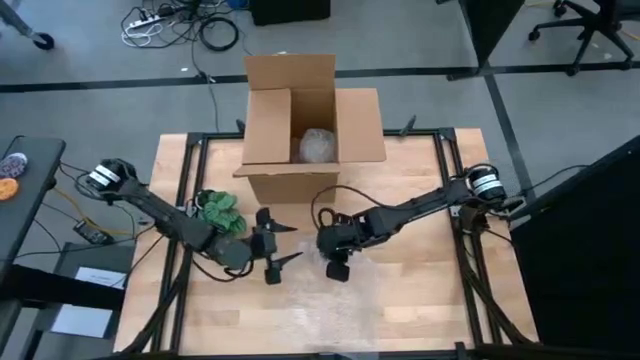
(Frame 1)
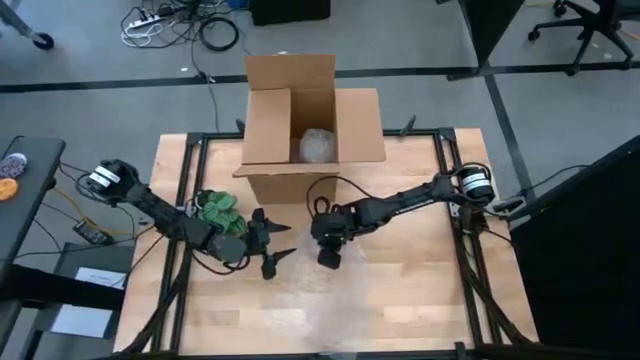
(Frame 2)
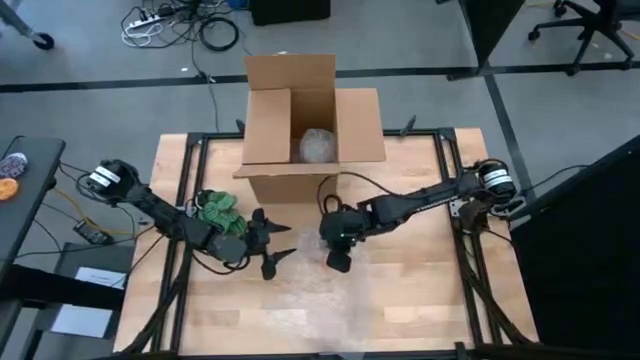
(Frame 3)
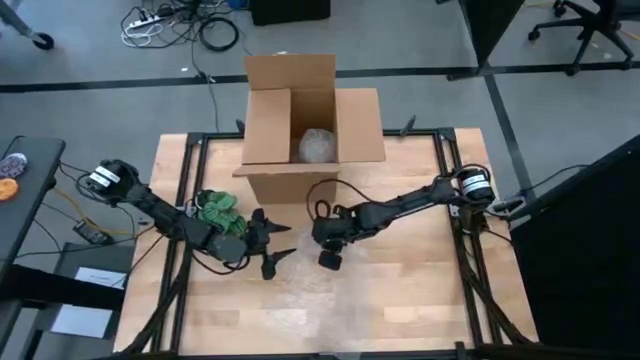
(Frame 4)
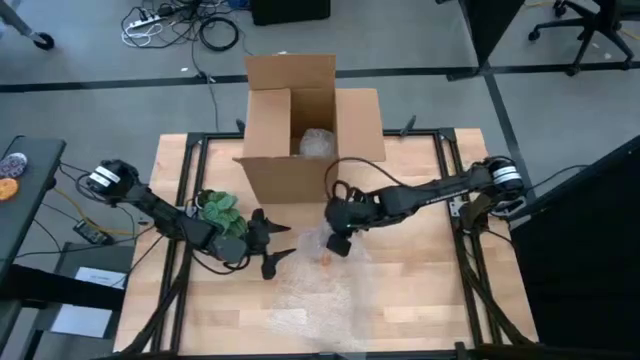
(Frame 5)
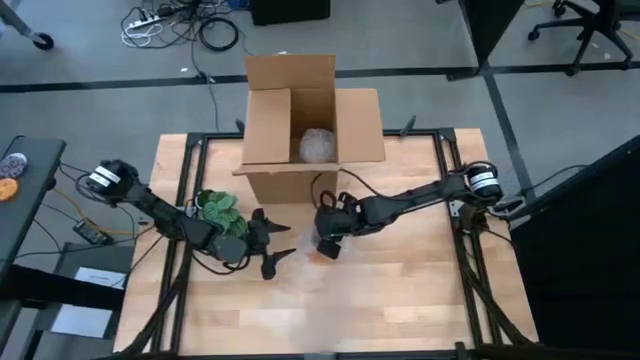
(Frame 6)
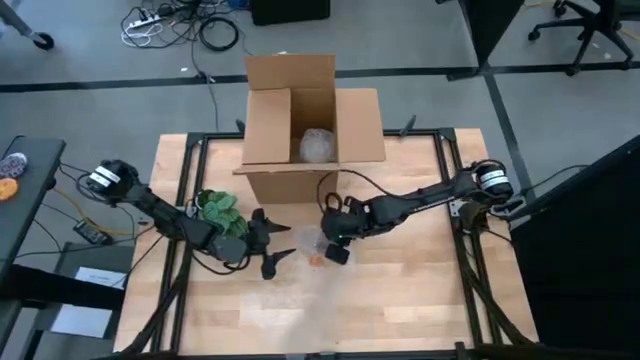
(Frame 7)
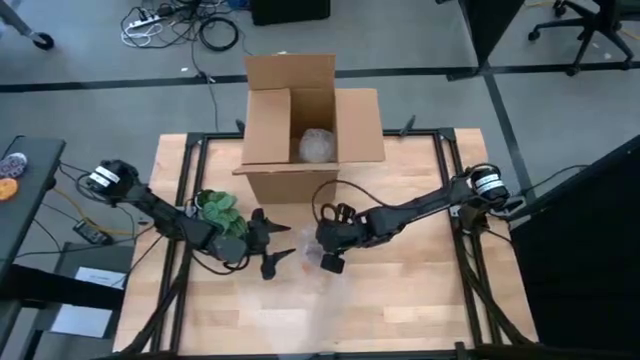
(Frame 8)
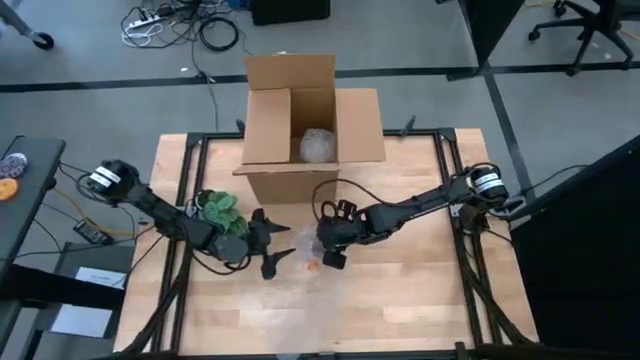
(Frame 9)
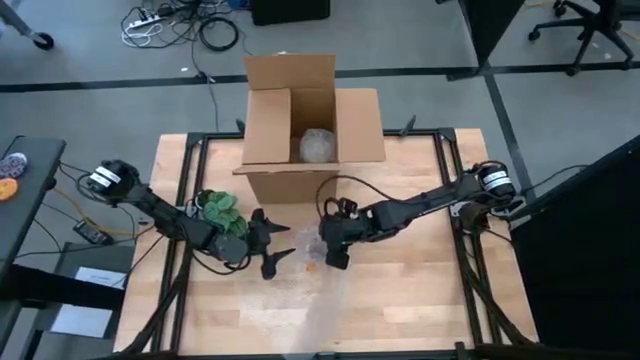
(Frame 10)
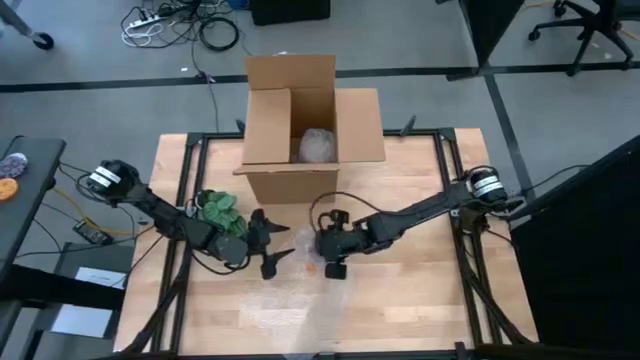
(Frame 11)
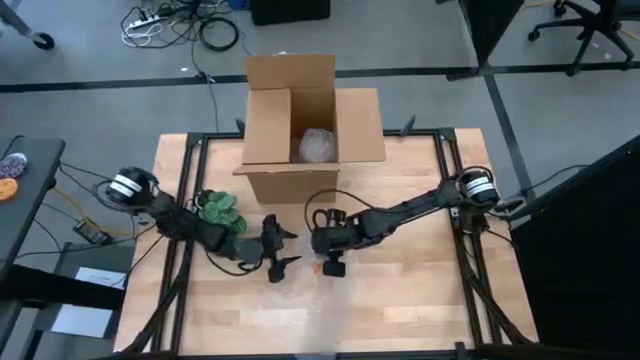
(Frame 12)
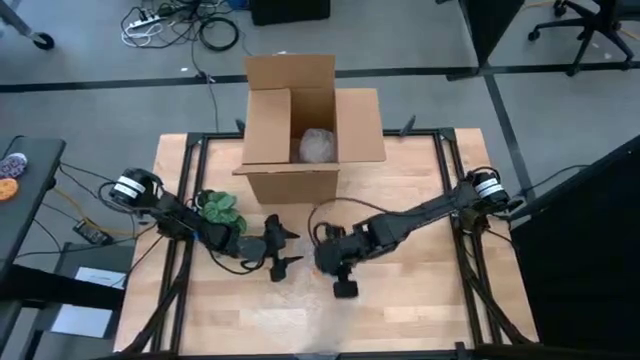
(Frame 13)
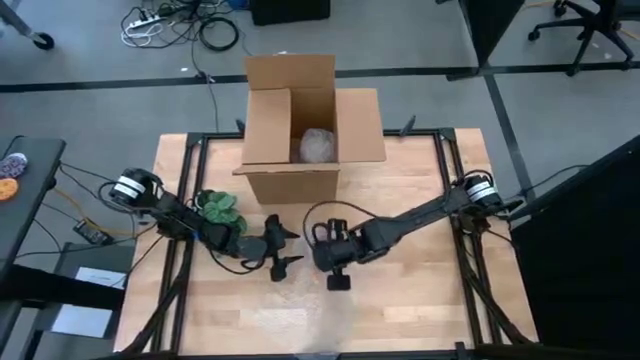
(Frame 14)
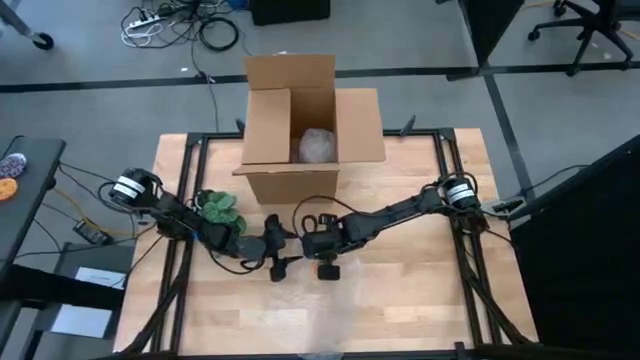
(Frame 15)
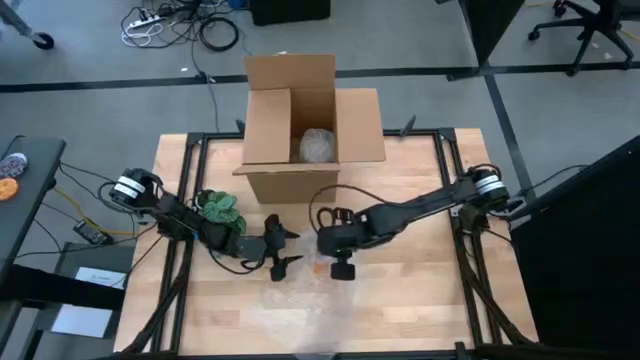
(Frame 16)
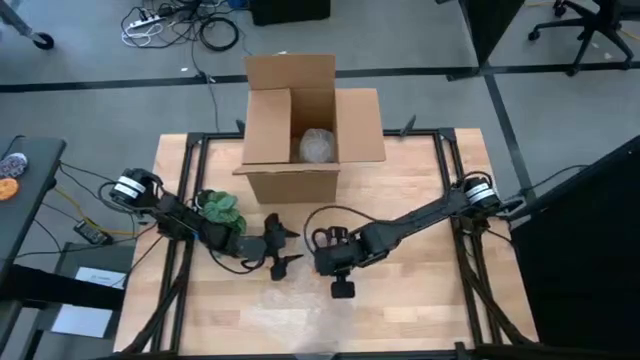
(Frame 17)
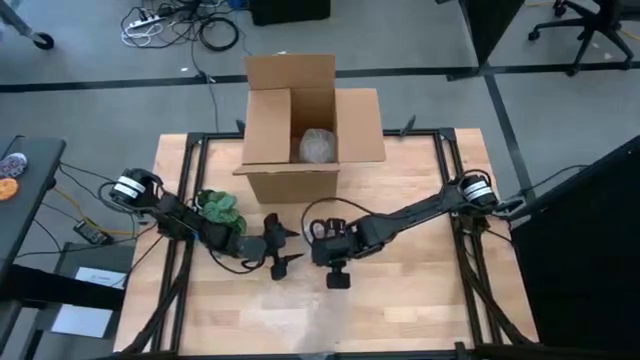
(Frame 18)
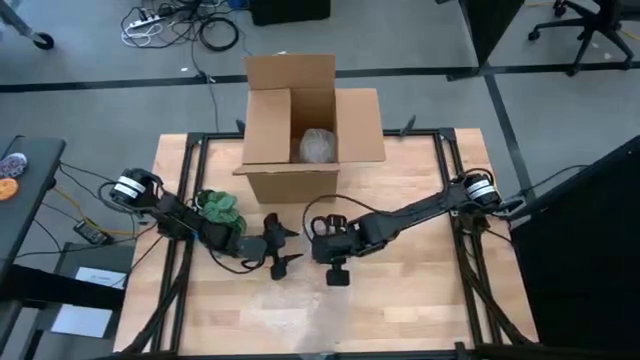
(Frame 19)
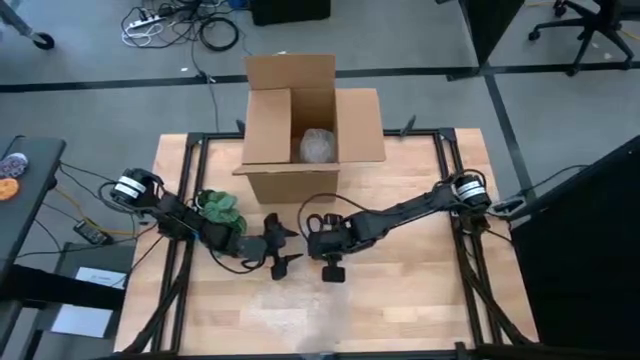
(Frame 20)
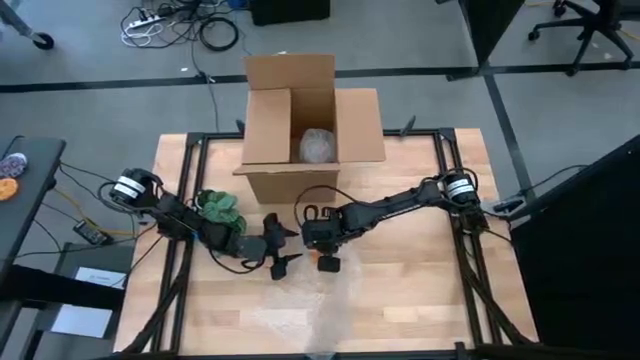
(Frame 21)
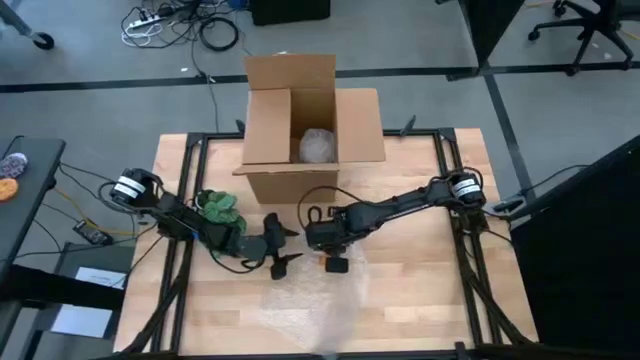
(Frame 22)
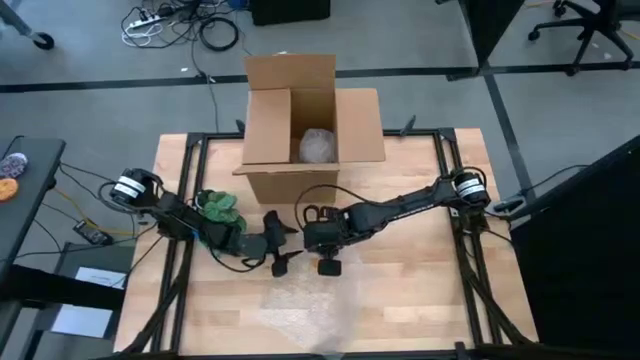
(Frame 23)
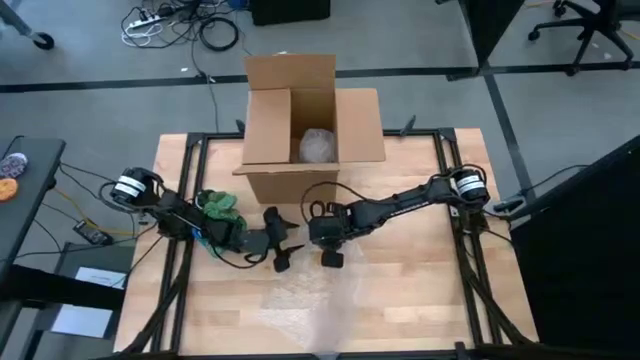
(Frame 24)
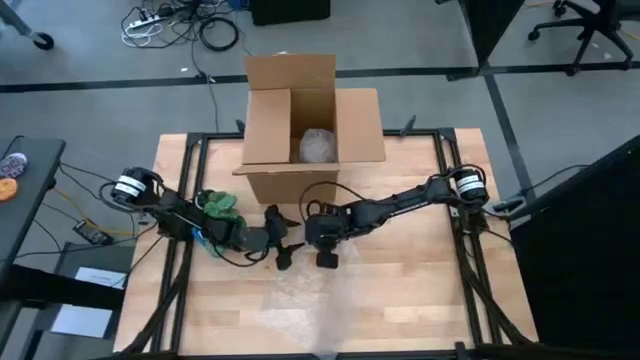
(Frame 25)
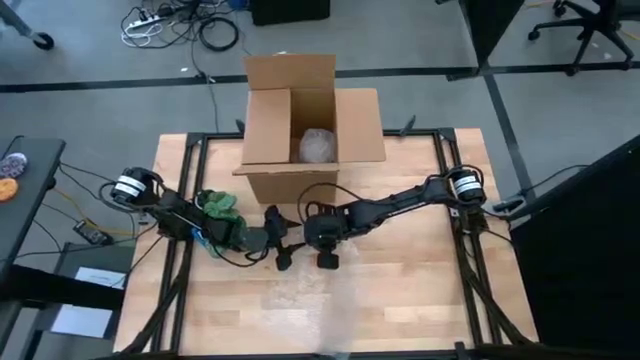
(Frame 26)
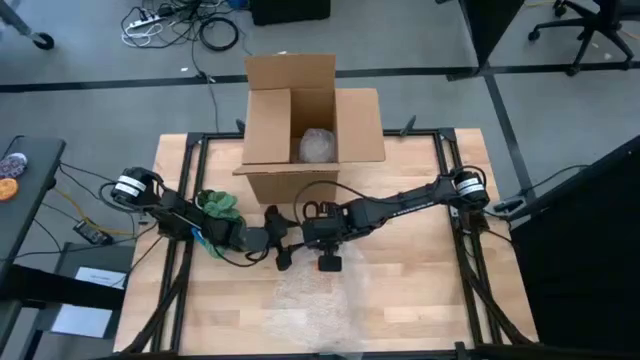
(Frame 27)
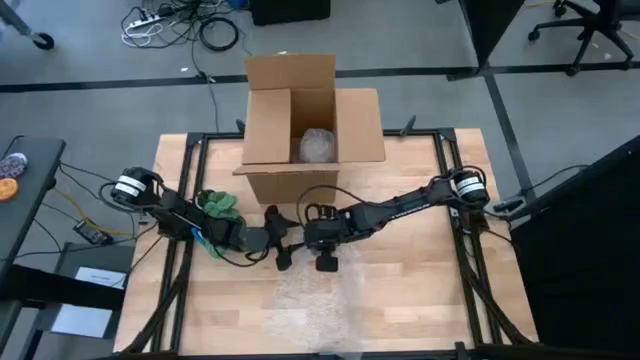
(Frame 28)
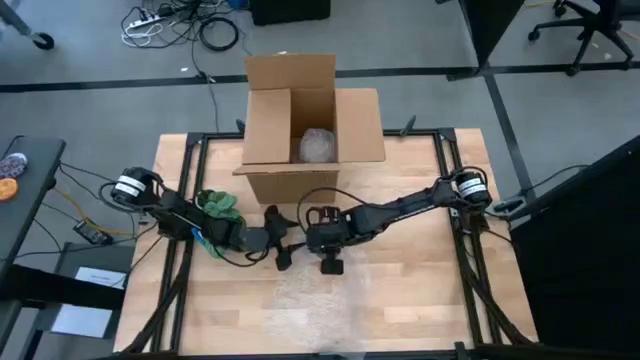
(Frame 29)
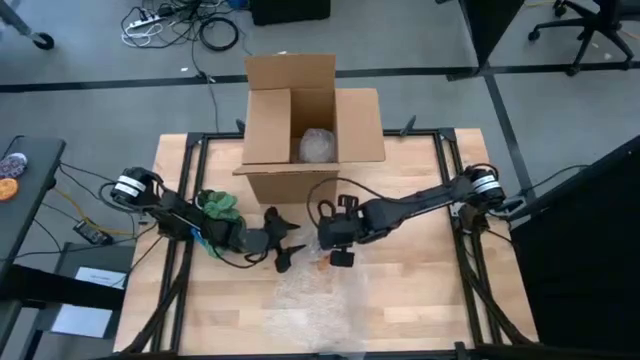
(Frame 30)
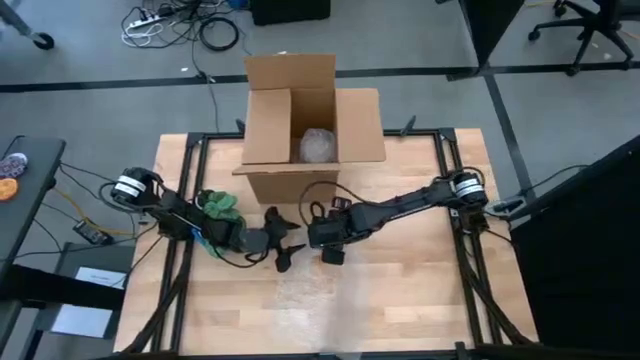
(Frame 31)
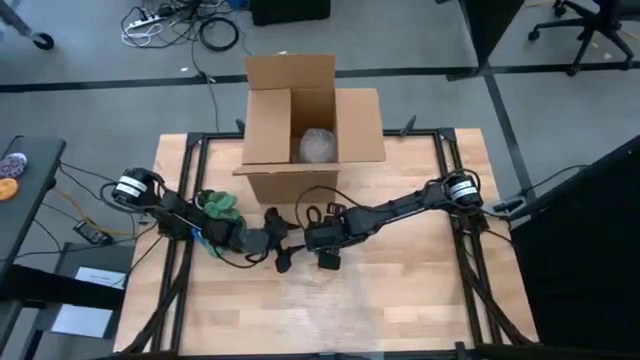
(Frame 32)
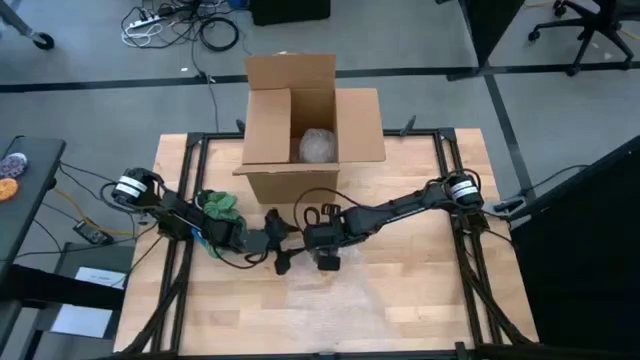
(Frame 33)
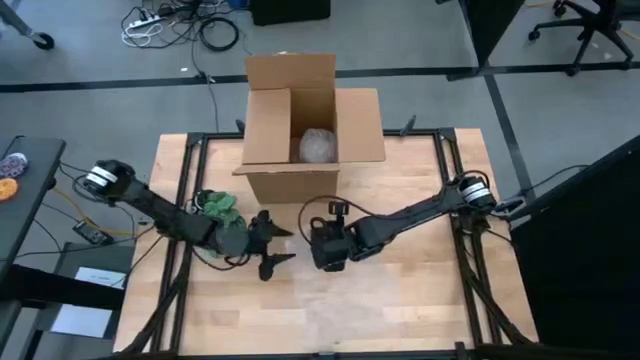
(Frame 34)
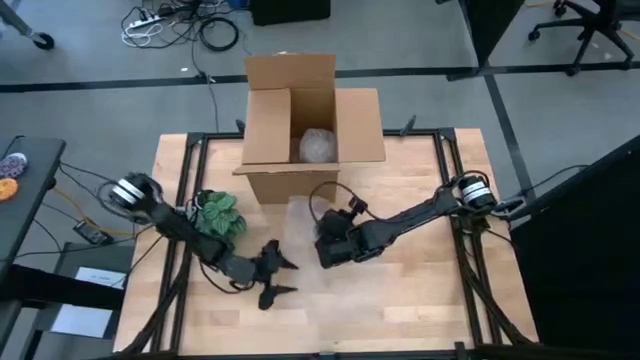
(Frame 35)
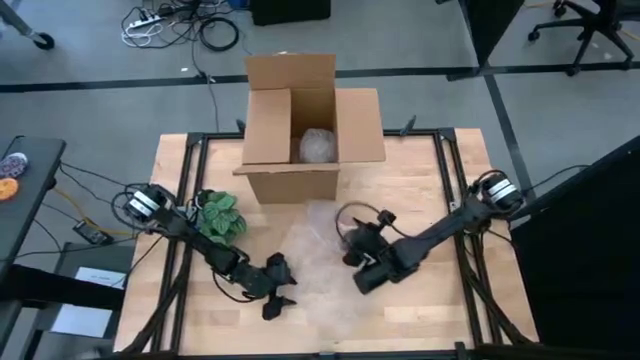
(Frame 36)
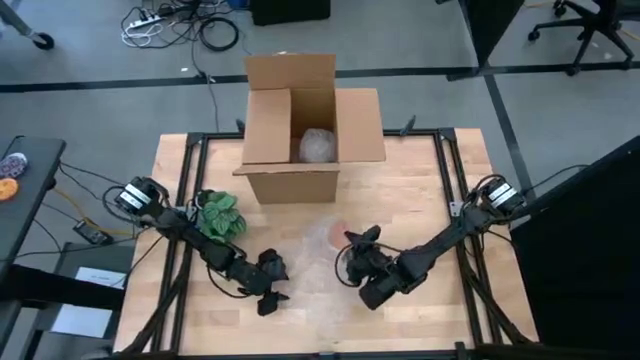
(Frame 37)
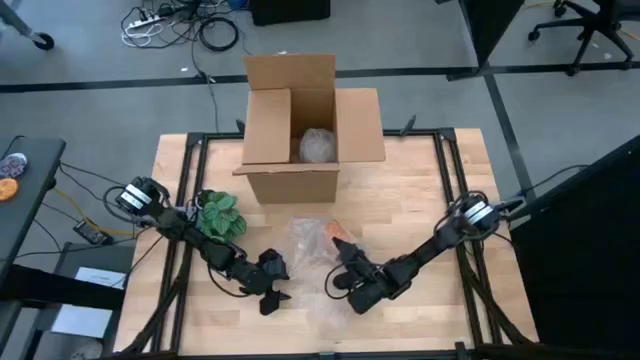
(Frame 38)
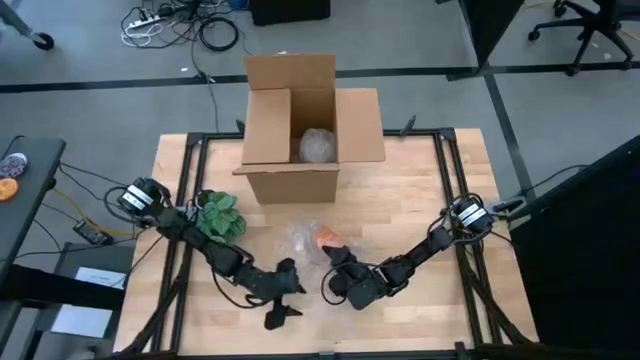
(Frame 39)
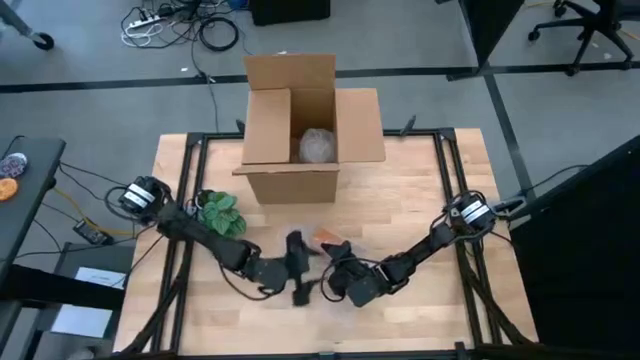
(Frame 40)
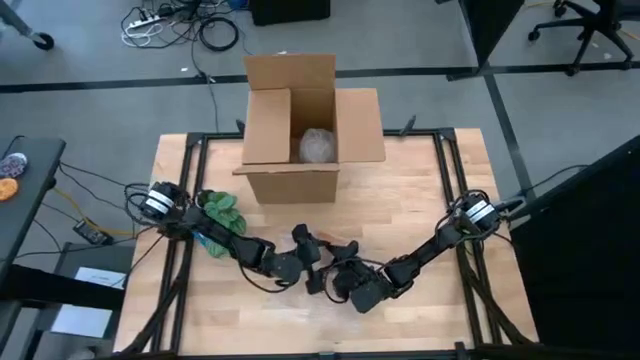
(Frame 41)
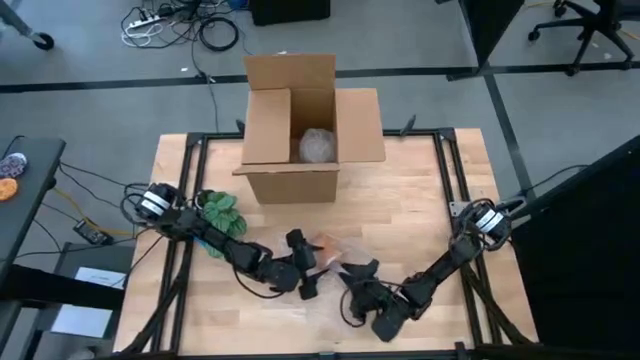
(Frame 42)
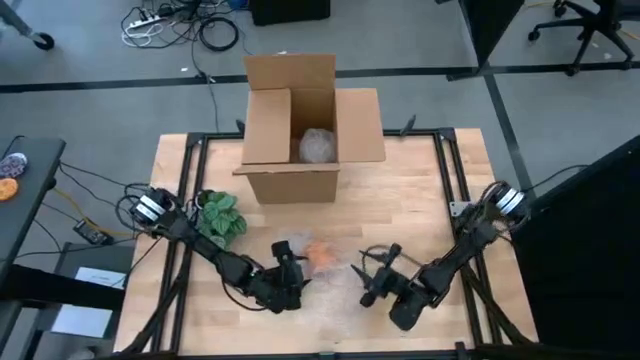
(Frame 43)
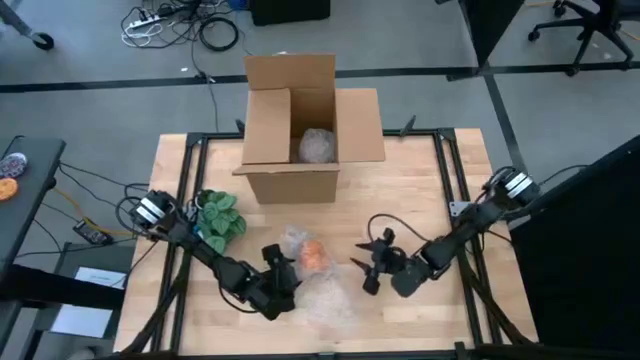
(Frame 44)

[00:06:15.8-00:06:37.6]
Task: wrap mug
Wrap the orange mug with the bubble wrap
